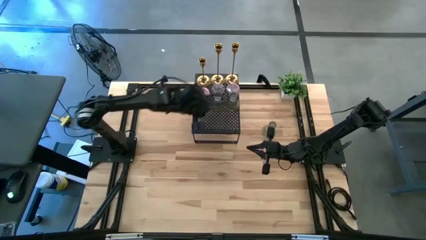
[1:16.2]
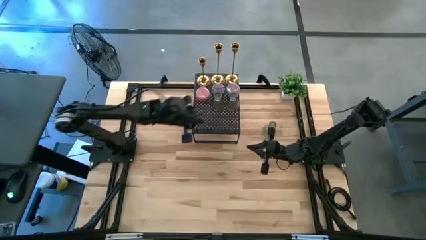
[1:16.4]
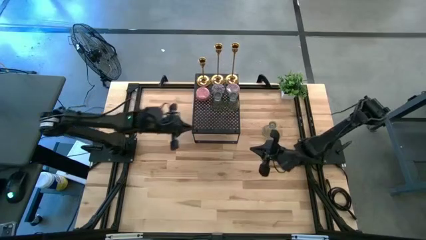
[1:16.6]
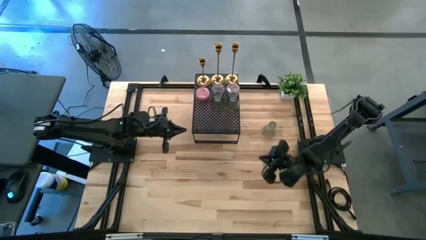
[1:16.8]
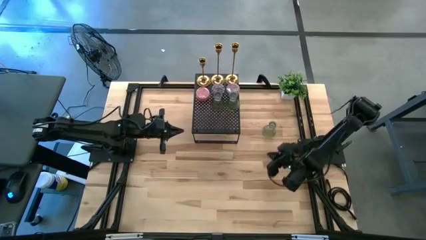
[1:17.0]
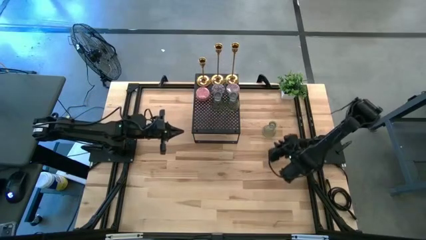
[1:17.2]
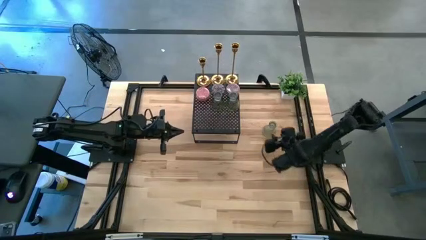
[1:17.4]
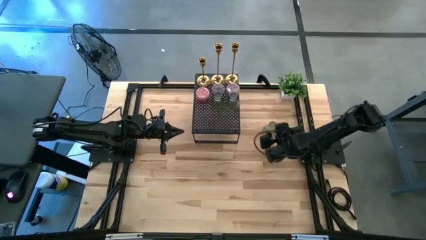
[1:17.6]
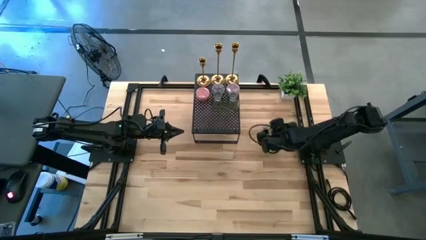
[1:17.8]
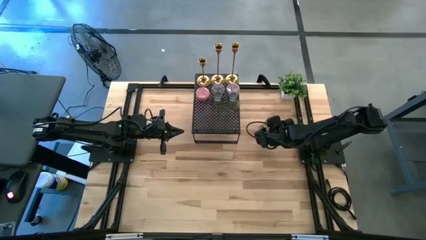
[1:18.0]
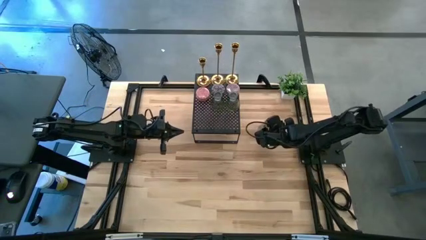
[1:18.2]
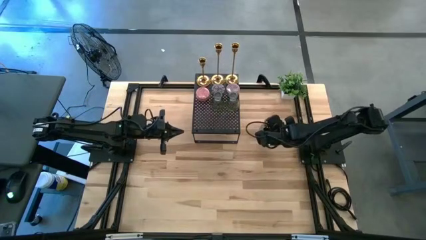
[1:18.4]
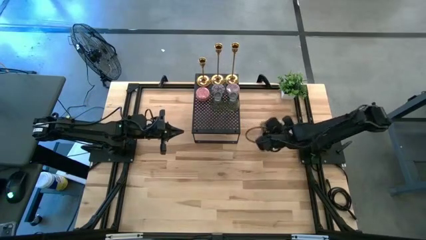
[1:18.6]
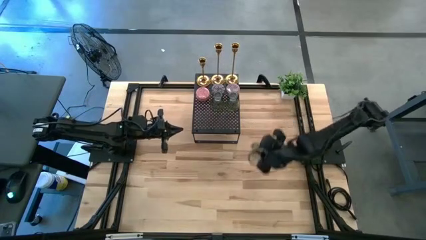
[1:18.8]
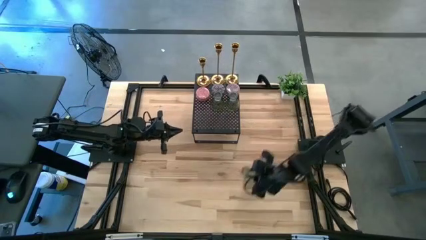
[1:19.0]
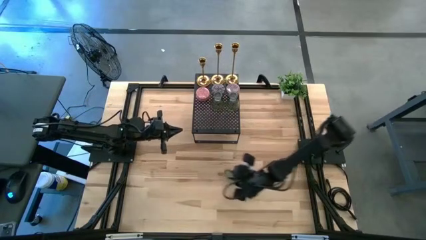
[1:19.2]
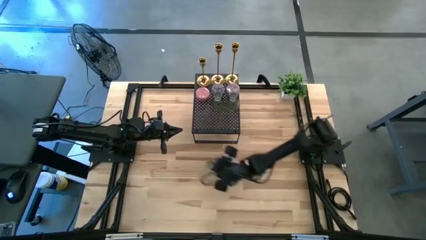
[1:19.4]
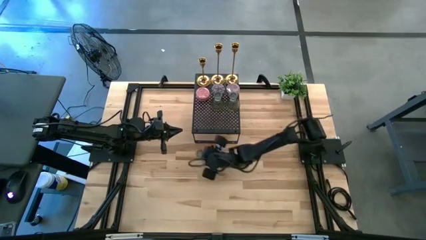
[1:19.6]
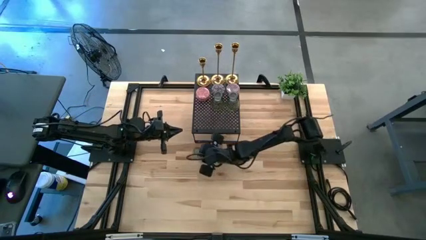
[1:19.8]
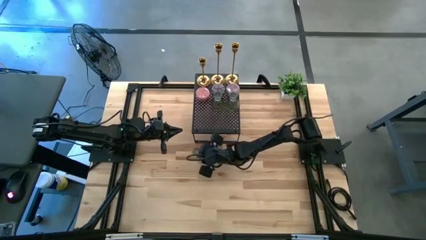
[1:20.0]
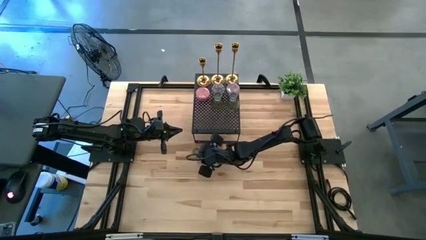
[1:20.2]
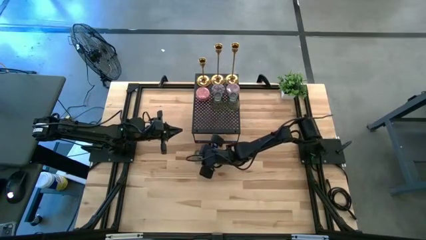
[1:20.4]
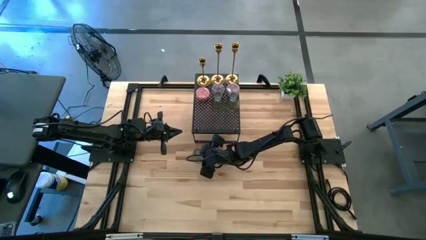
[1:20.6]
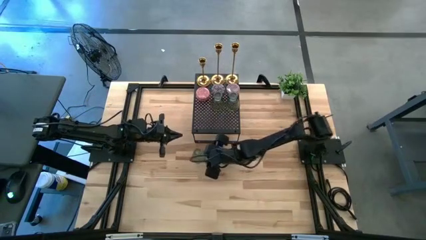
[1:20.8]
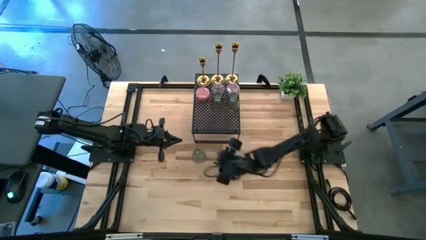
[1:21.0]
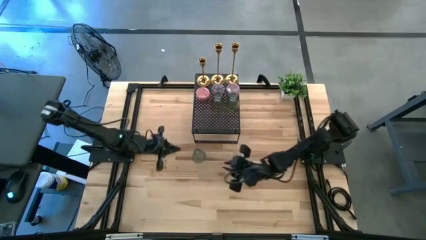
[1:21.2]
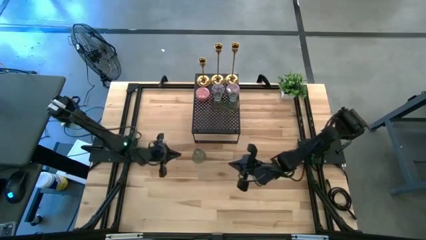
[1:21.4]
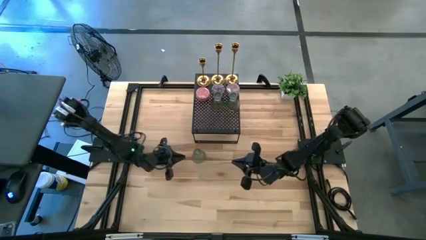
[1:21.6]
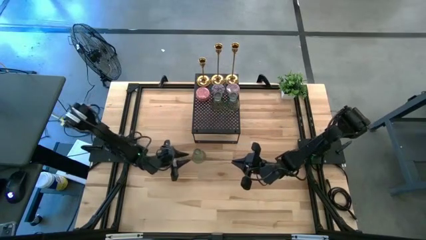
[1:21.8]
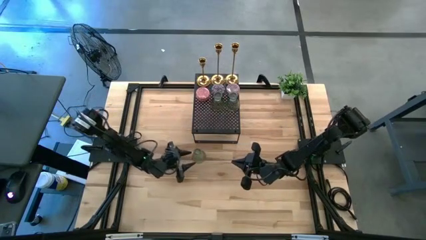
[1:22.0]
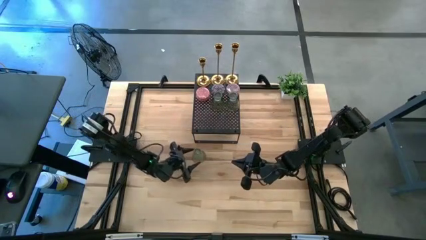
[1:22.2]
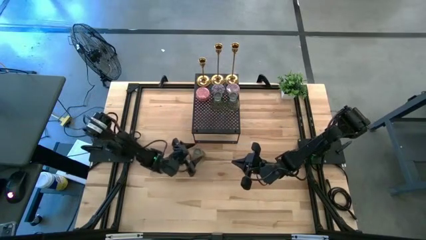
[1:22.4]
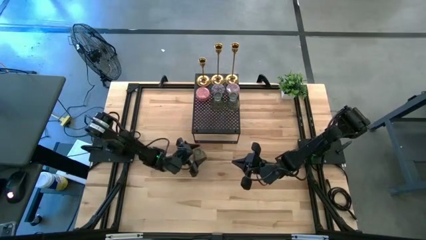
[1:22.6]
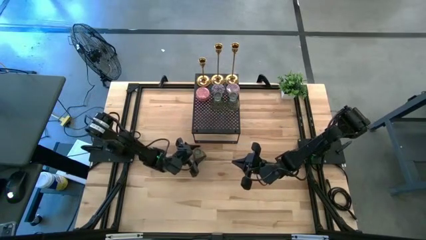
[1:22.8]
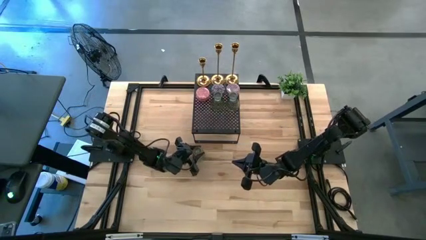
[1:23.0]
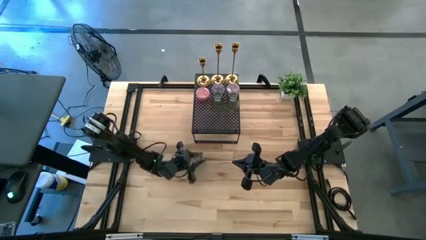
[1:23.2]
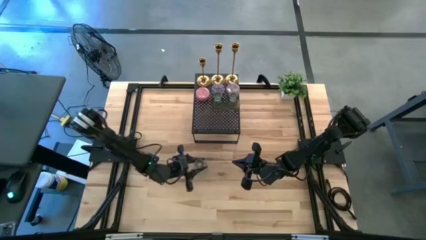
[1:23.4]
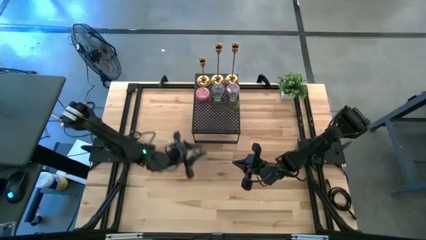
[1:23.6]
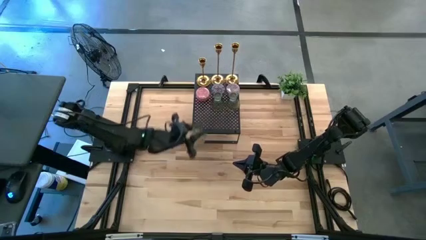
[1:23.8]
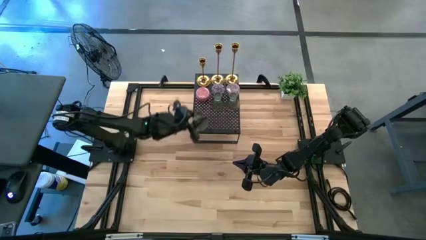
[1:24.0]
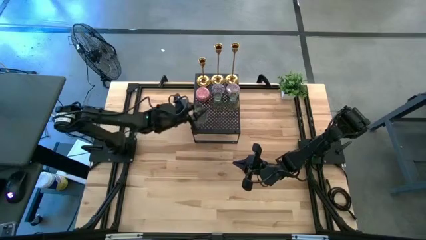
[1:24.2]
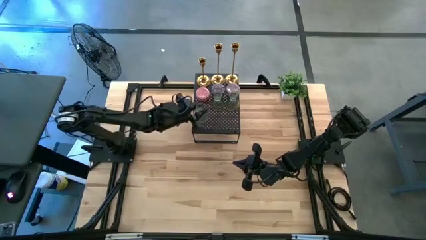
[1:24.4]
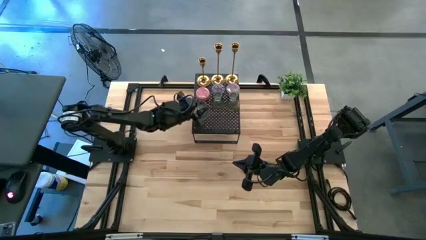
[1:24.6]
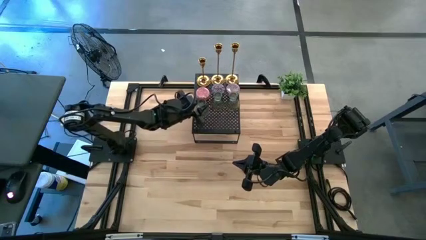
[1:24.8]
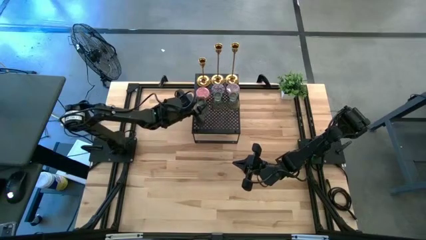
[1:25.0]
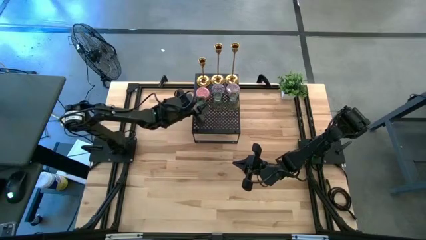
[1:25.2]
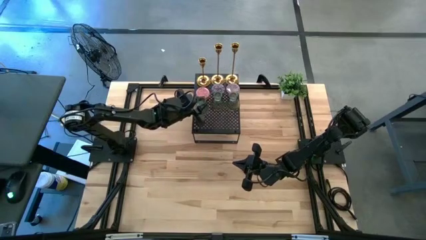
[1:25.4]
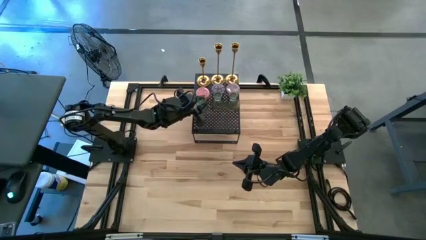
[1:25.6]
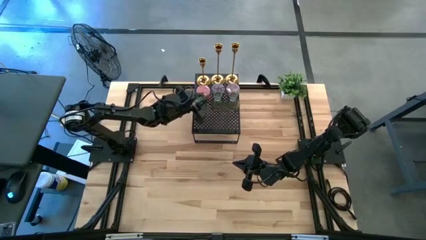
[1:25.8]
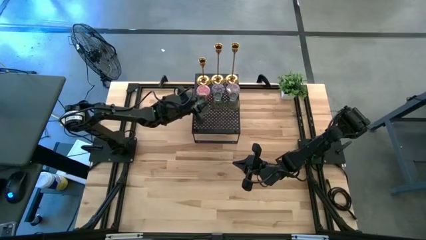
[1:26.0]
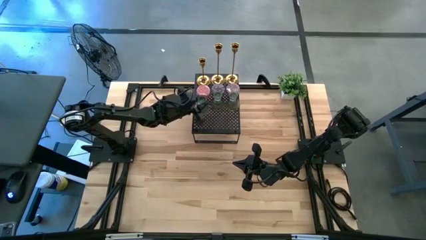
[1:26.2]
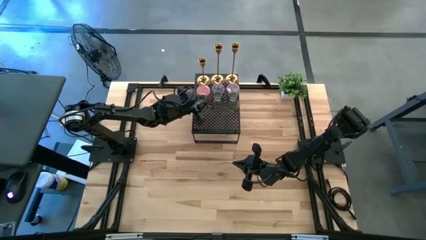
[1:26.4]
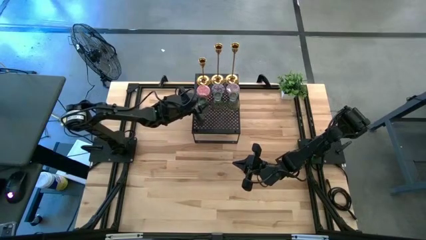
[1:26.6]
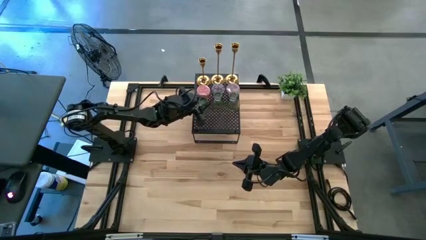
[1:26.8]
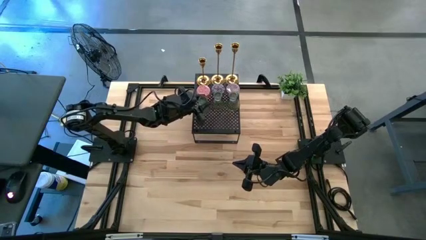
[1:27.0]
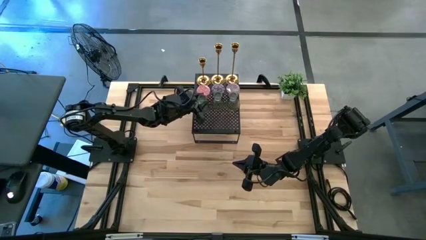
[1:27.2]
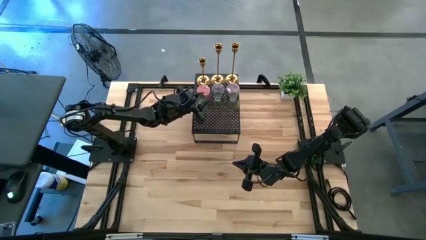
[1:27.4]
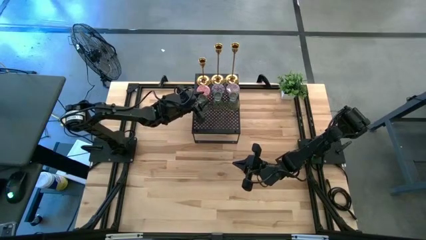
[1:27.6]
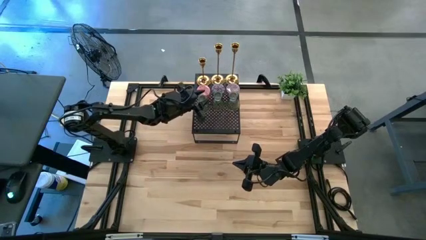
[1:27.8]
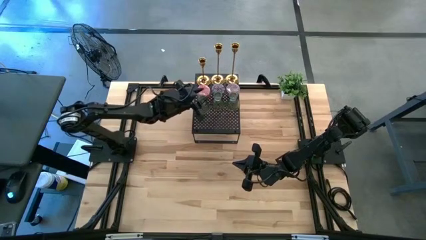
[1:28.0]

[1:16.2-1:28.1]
Task: Pick & Place candle stick holders
Put the green glass on the shelf
